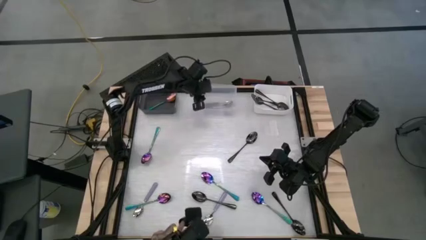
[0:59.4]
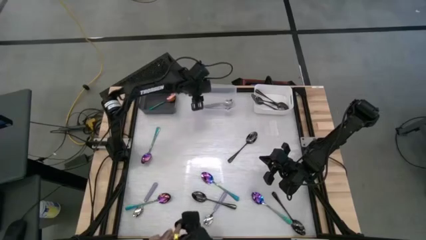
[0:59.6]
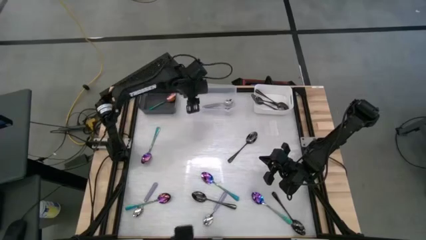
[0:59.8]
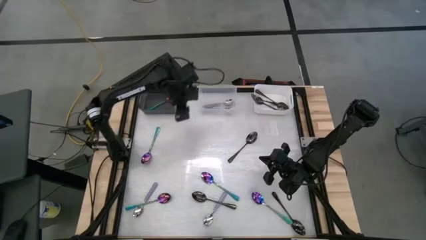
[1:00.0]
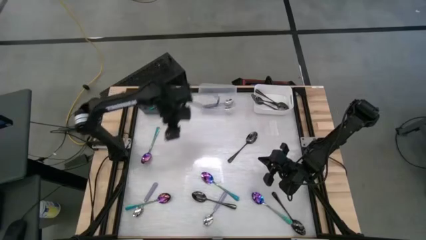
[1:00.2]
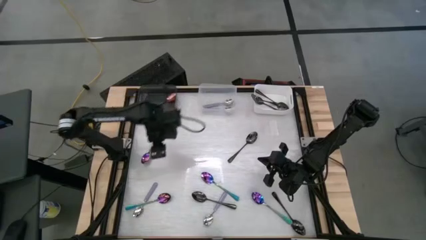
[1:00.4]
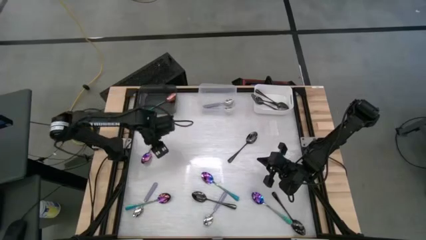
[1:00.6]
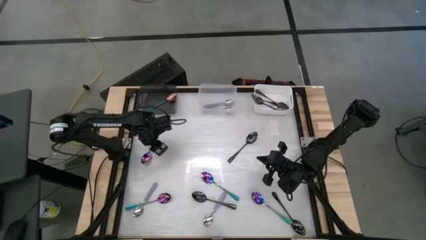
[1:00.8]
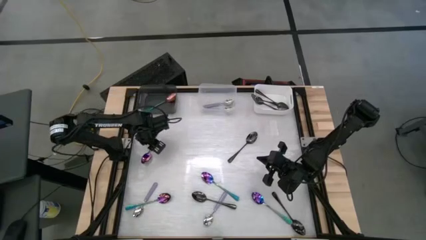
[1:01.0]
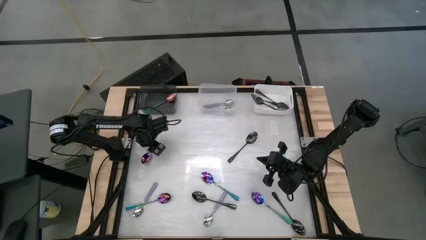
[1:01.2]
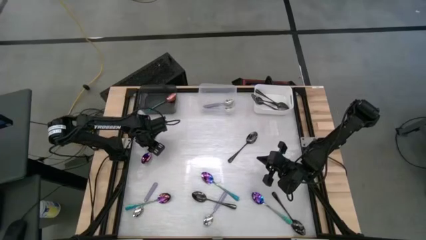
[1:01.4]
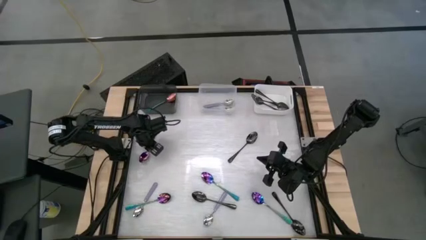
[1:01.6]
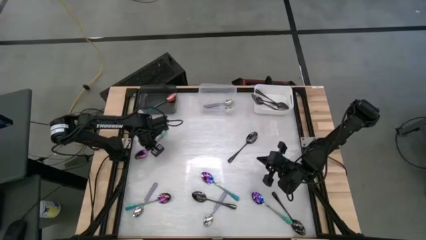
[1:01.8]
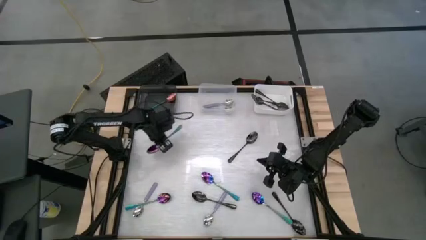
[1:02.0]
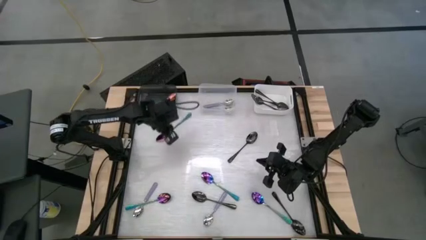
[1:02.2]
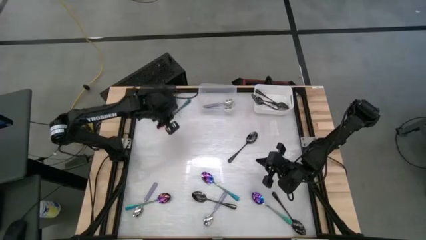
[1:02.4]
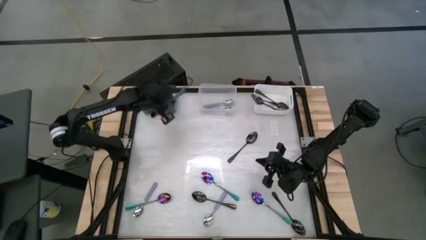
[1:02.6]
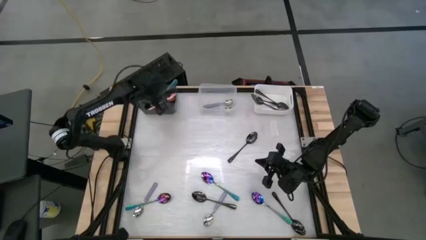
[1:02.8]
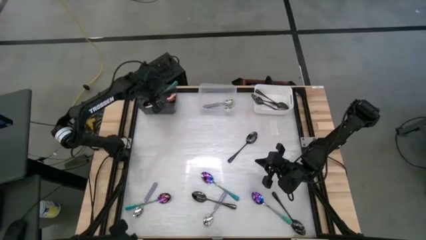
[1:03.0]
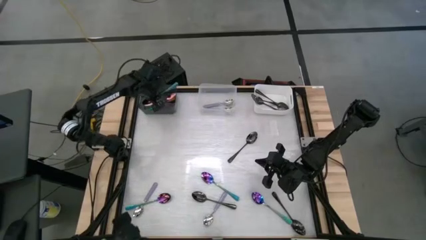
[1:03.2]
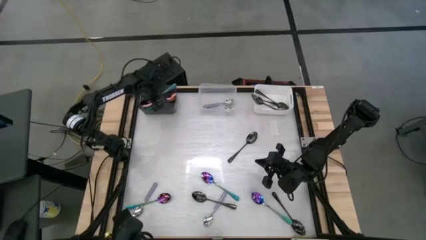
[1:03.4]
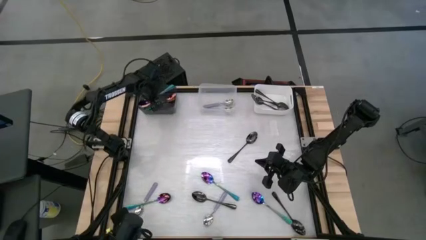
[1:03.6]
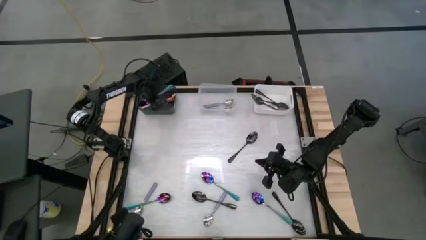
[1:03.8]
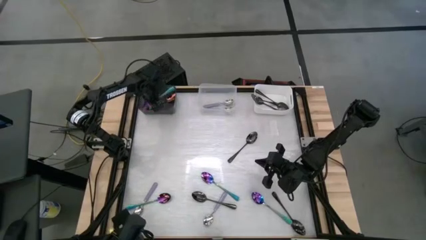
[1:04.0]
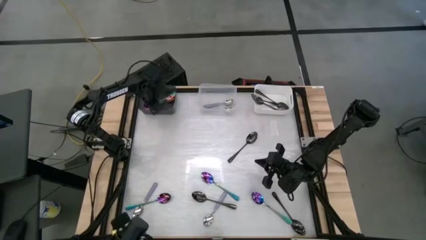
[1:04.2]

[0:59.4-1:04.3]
Task: Sort silverware by color (type)
Put the blue spoon into the black bin

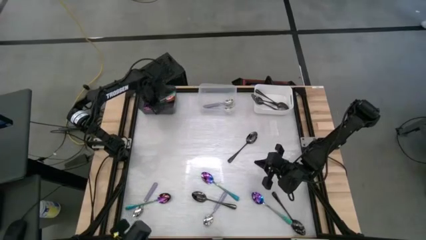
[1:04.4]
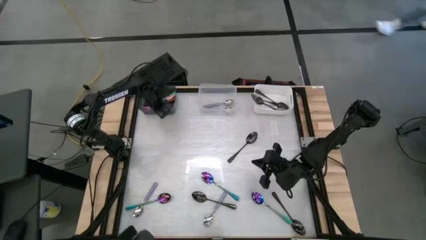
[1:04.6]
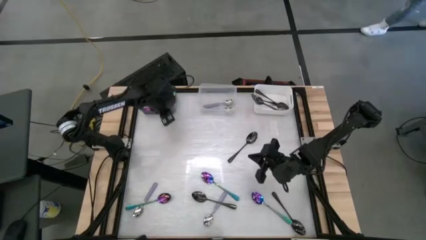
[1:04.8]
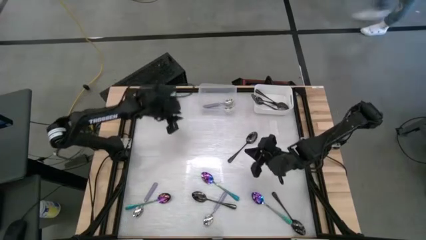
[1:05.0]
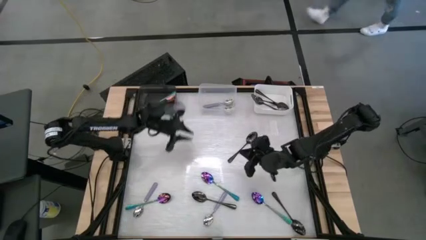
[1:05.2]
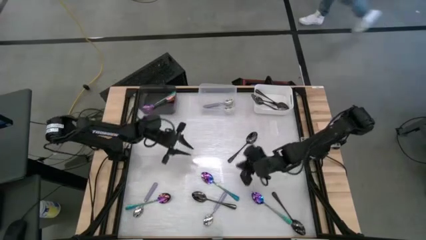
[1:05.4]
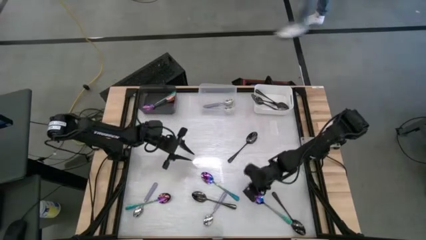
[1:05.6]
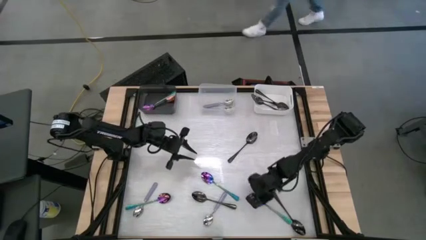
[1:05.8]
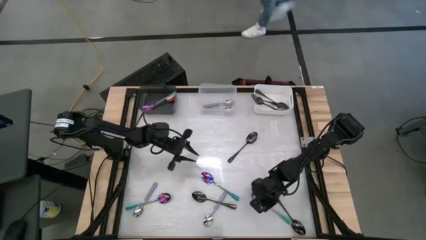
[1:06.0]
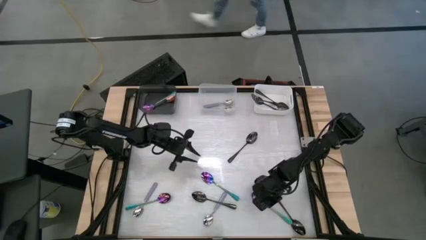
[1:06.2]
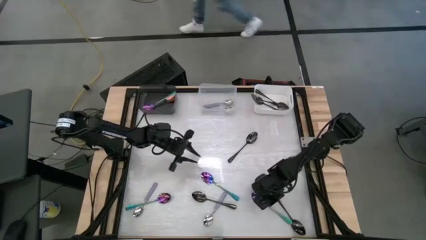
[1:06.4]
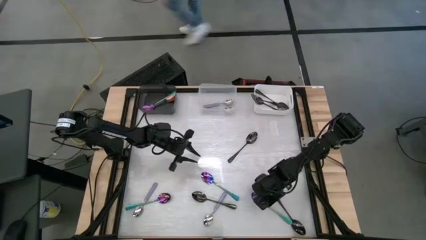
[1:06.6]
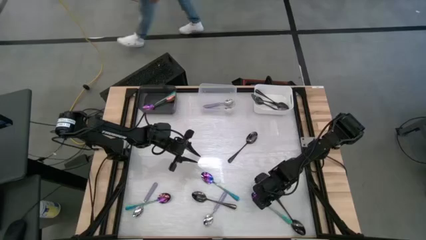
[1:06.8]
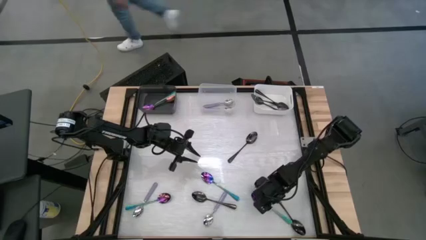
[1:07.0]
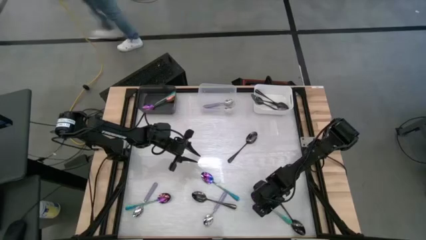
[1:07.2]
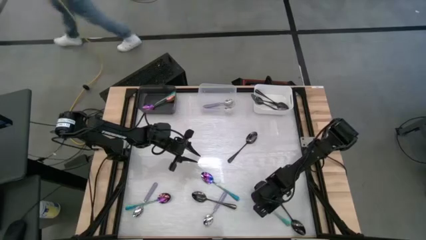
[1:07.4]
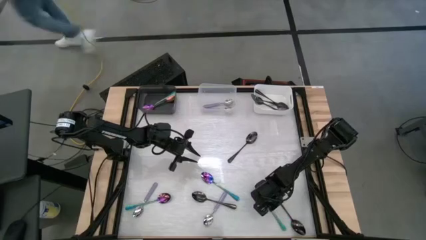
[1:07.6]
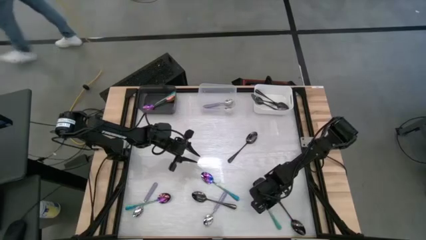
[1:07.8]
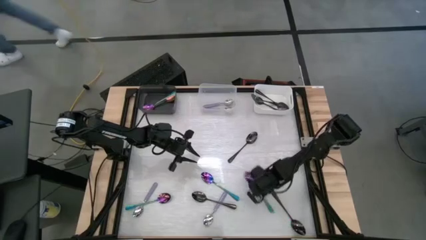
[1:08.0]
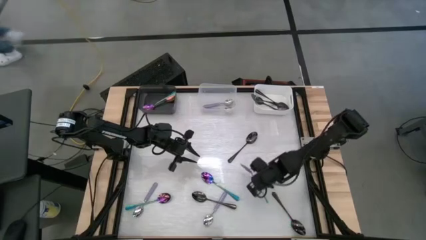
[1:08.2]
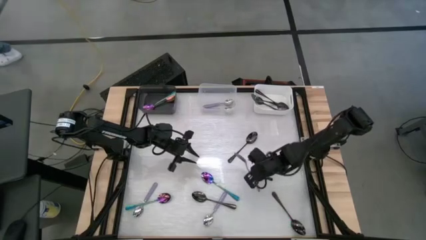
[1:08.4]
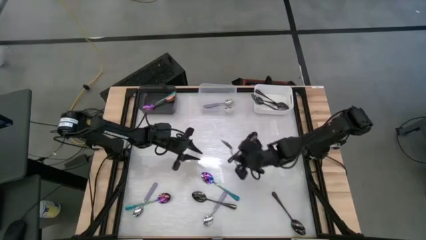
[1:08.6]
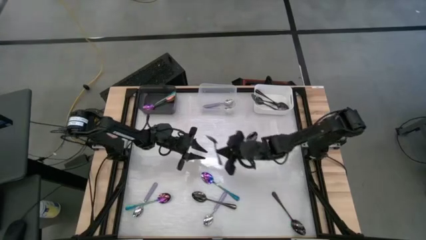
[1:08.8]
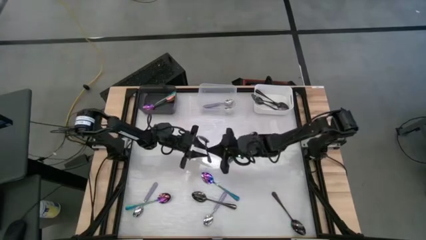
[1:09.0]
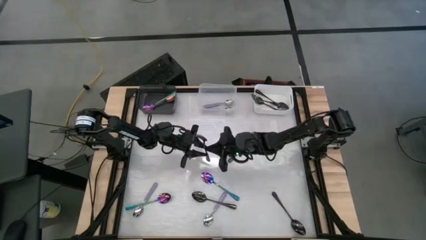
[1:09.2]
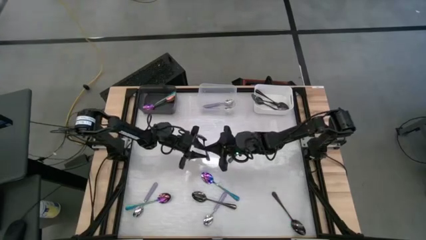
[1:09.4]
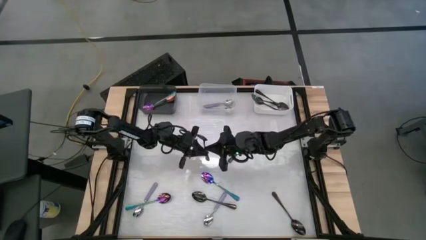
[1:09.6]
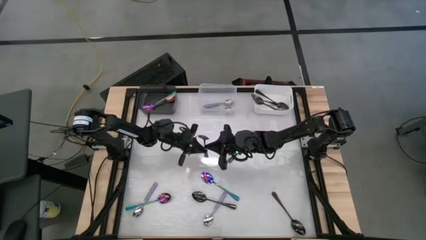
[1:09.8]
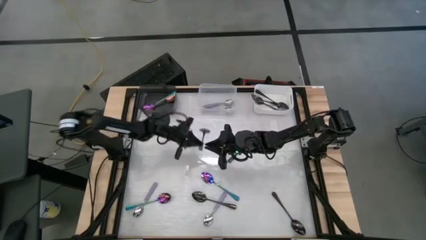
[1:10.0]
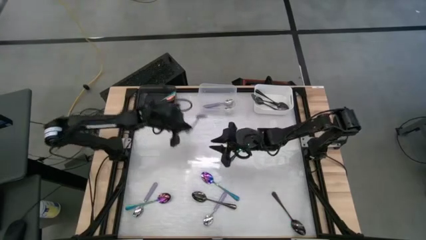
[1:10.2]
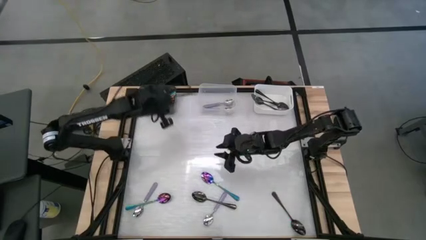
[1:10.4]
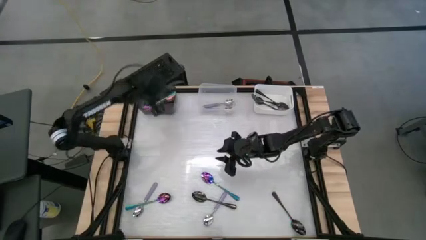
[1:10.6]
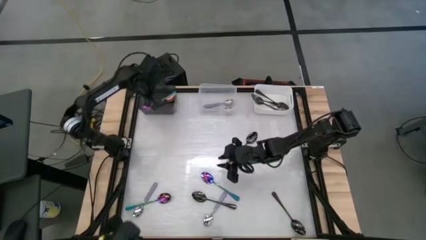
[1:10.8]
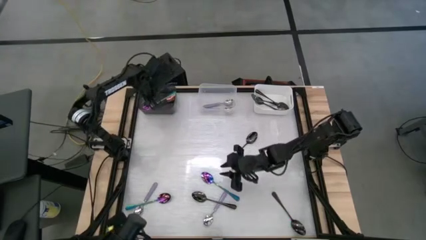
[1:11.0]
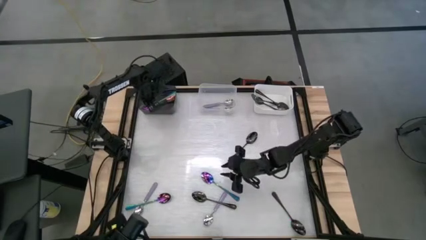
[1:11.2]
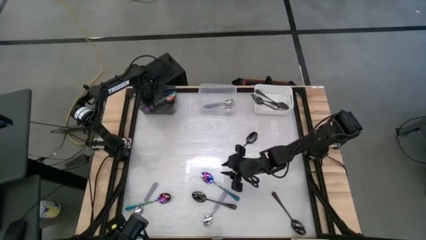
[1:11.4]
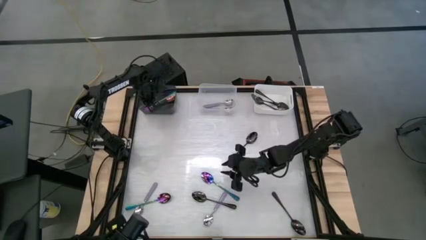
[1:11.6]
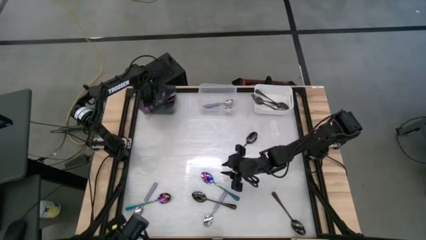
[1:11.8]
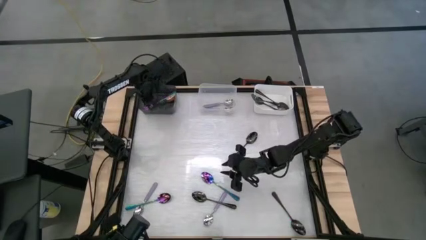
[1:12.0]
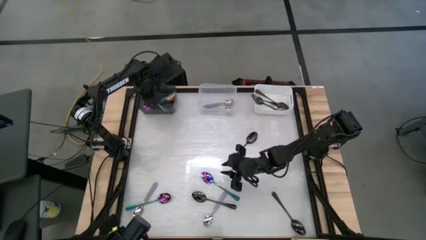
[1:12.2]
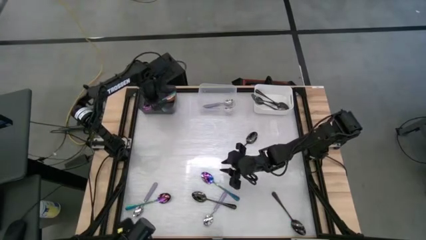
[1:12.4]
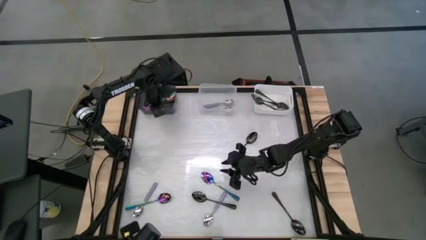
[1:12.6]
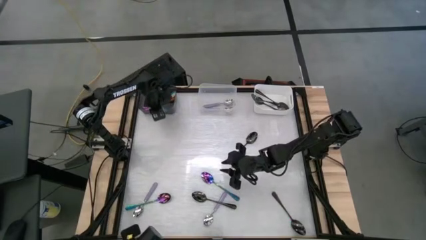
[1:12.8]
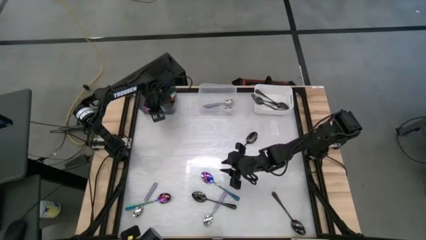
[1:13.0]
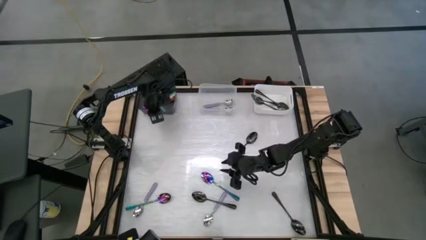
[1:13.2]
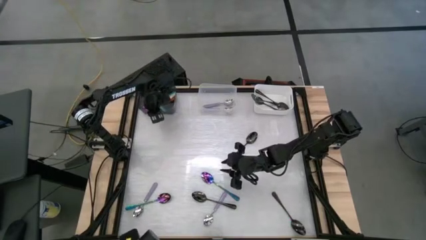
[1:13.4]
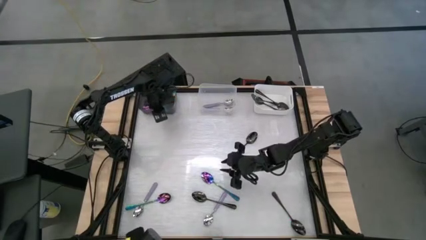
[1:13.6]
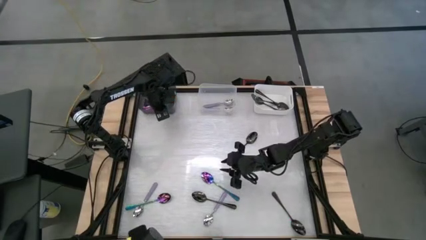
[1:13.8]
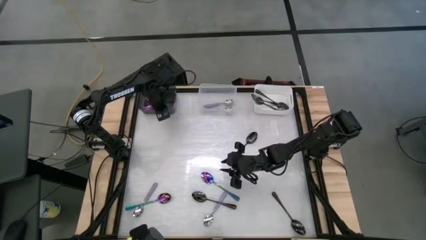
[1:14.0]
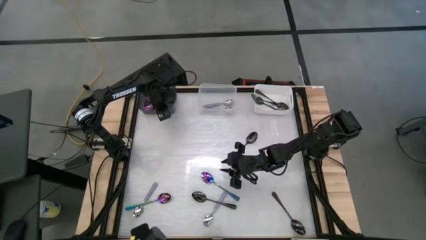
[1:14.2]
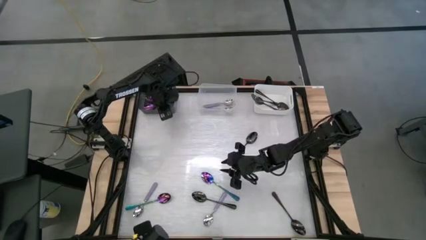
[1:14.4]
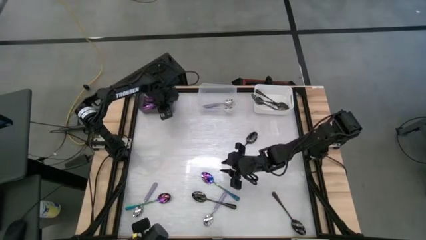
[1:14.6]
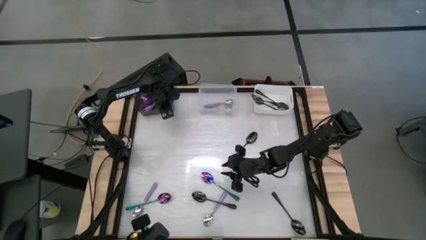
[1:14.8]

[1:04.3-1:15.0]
Put the blue spoon into the black bin

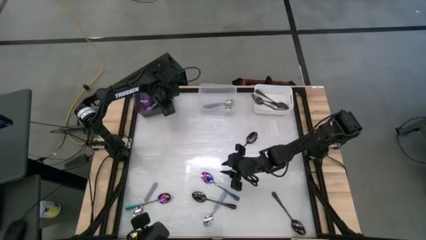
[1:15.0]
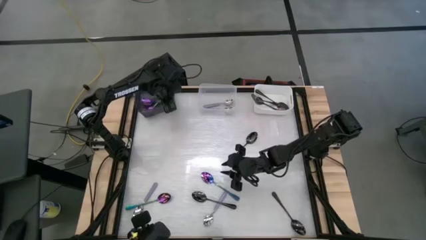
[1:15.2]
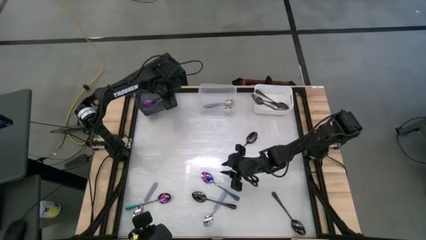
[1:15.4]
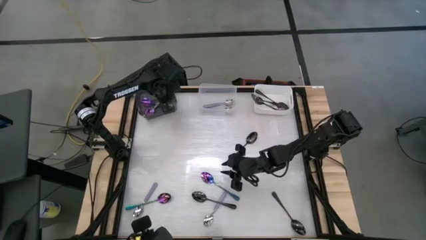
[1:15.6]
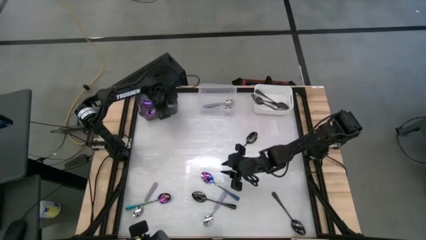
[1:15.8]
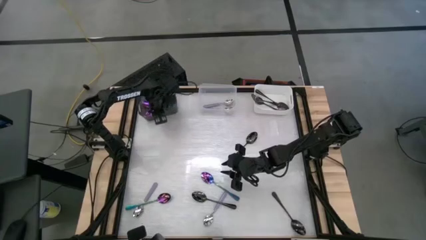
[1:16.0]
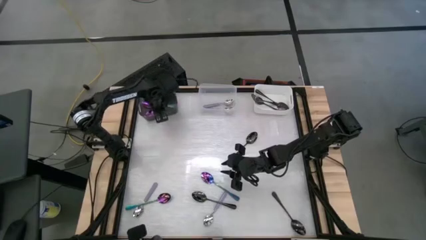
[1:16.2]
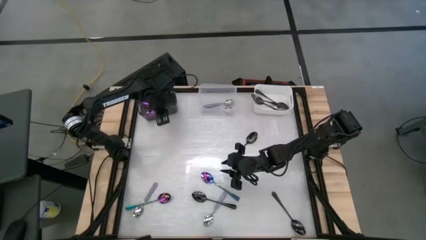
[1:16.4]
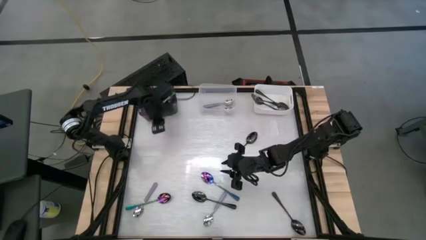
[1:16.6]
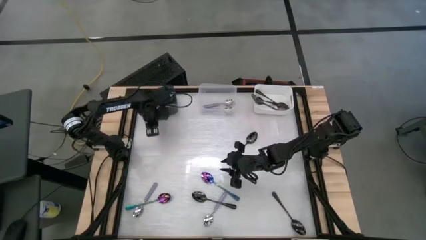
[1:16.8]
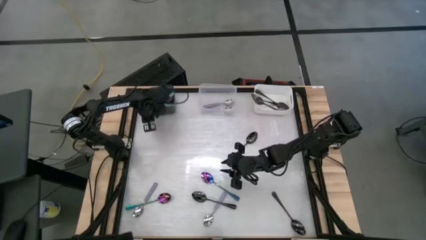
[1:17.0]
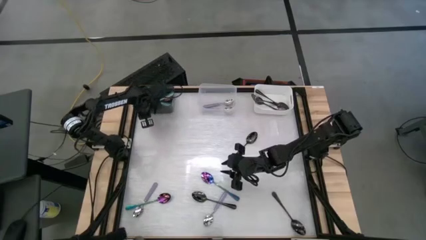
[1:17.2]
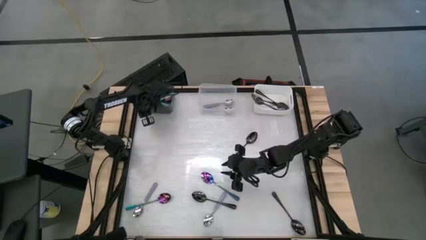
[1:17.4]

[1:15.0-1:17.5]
Adjust the black bin
